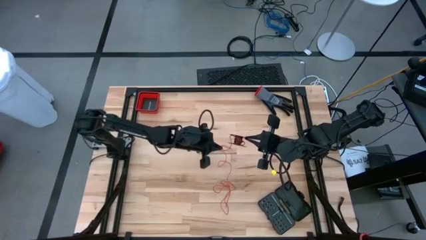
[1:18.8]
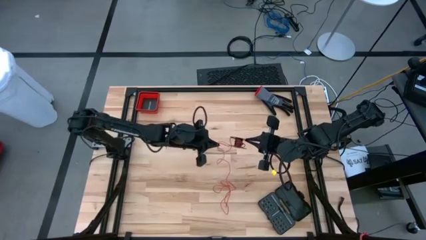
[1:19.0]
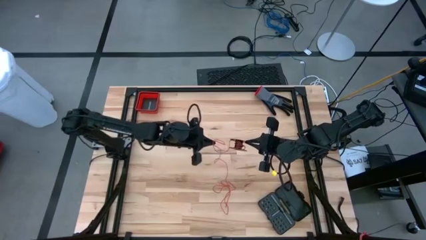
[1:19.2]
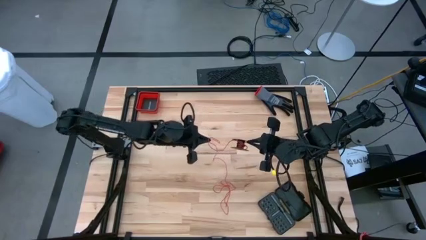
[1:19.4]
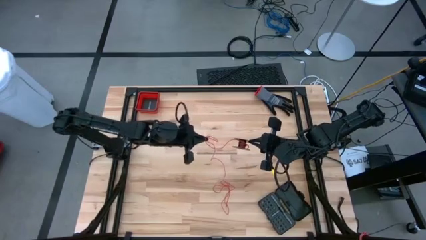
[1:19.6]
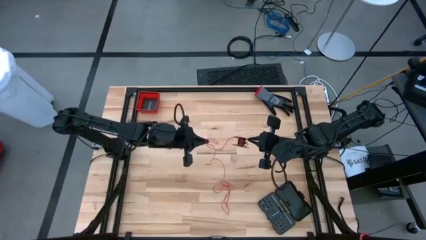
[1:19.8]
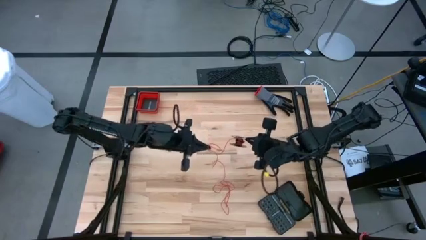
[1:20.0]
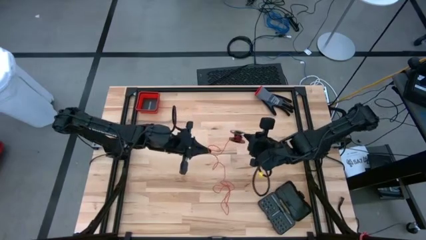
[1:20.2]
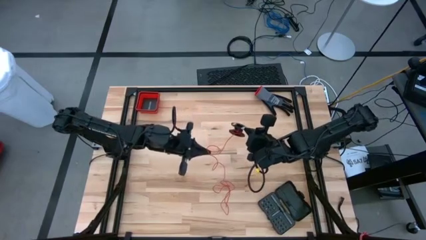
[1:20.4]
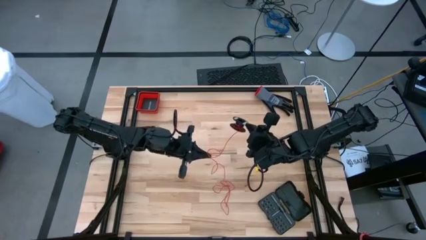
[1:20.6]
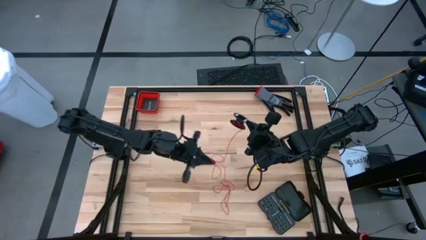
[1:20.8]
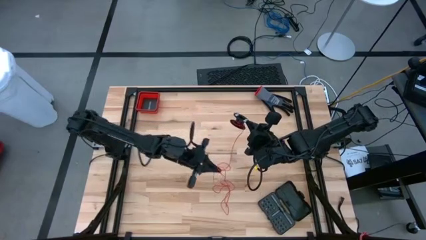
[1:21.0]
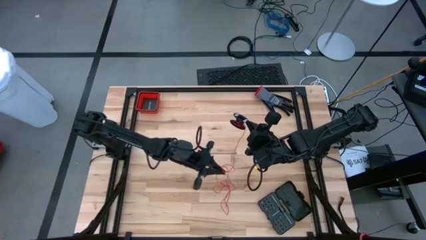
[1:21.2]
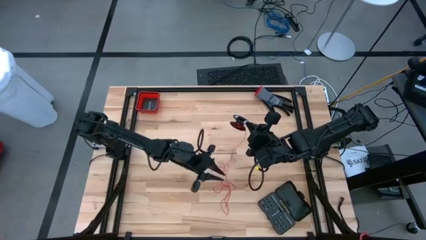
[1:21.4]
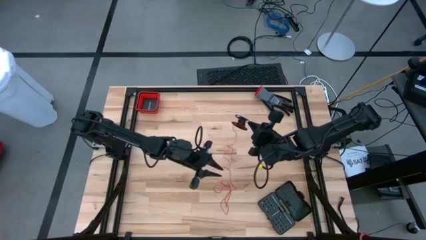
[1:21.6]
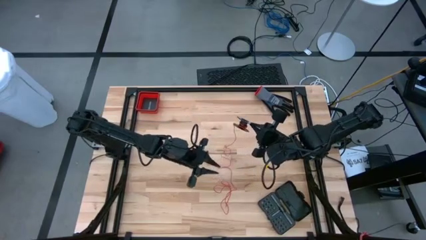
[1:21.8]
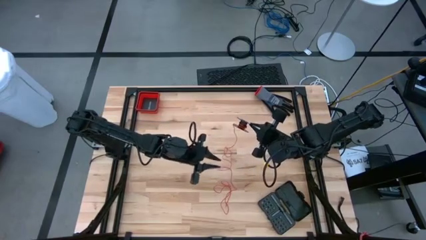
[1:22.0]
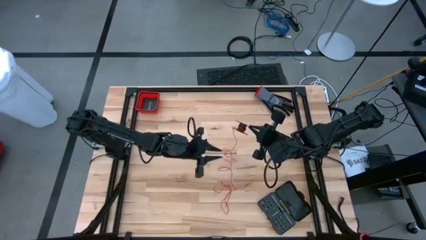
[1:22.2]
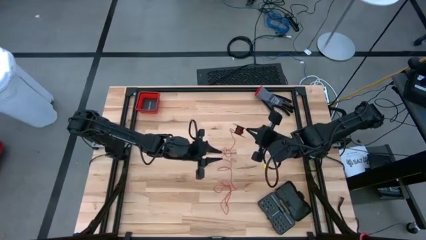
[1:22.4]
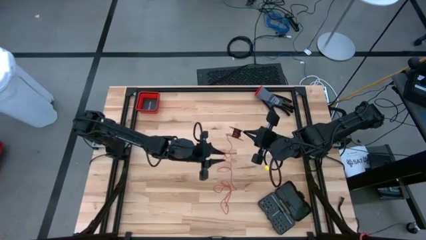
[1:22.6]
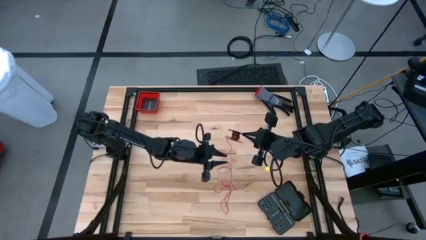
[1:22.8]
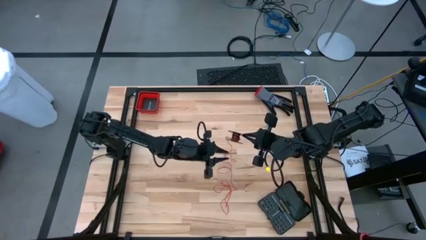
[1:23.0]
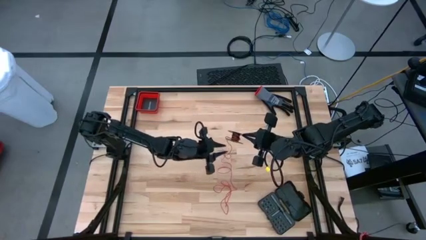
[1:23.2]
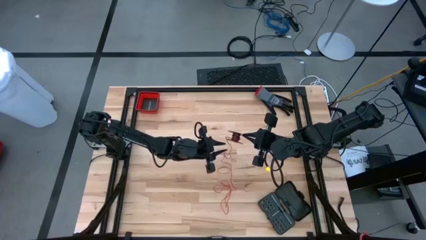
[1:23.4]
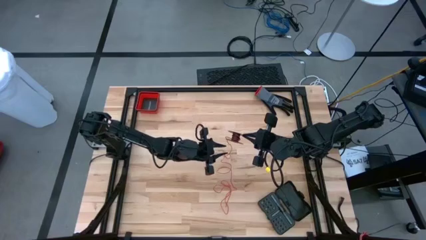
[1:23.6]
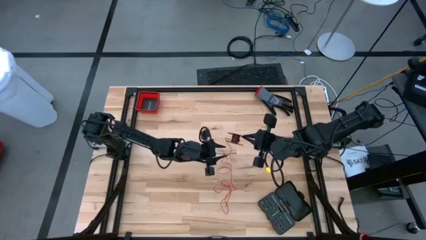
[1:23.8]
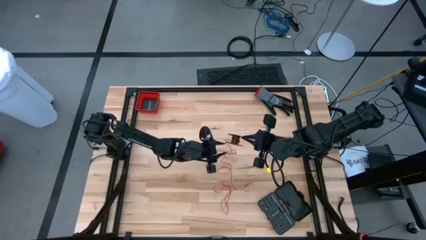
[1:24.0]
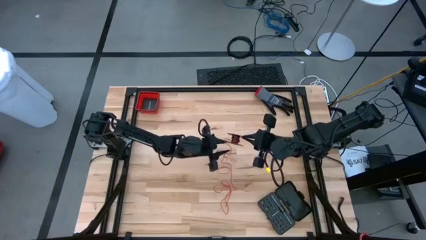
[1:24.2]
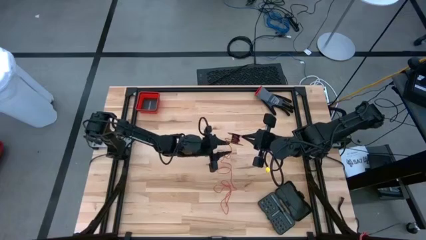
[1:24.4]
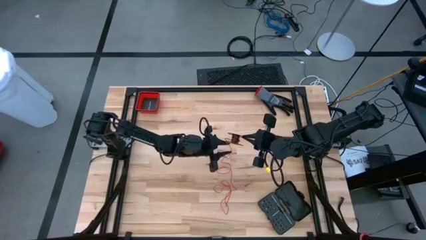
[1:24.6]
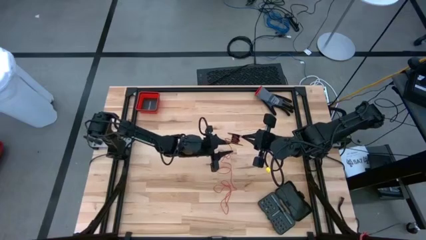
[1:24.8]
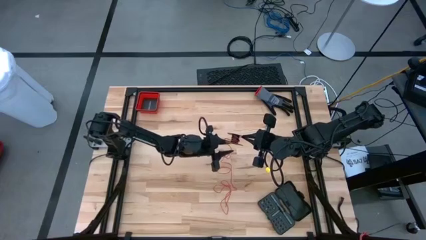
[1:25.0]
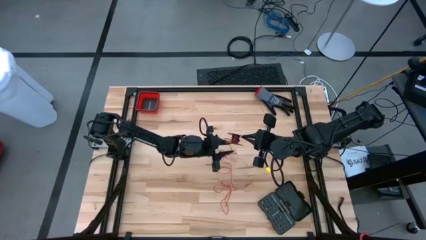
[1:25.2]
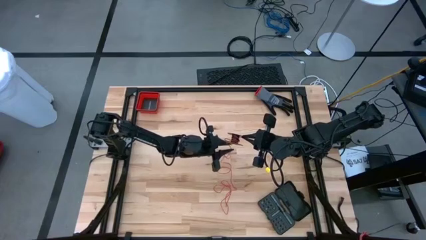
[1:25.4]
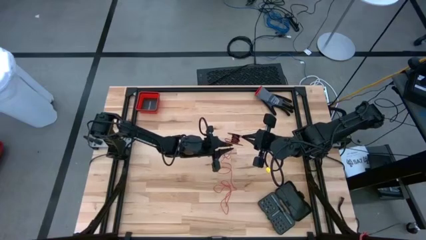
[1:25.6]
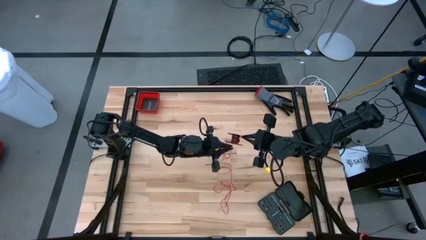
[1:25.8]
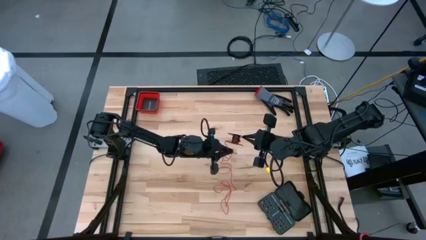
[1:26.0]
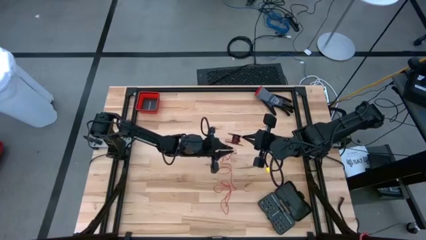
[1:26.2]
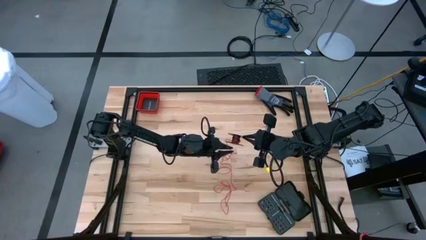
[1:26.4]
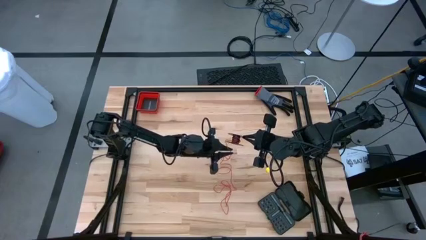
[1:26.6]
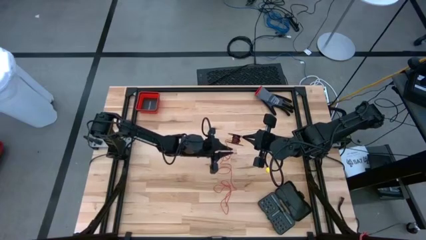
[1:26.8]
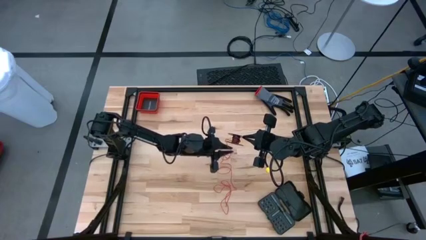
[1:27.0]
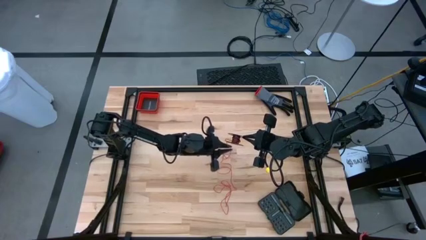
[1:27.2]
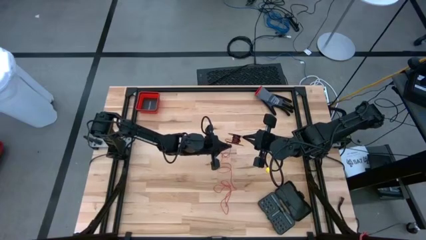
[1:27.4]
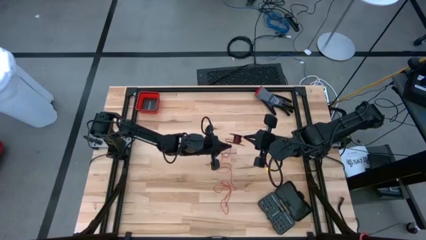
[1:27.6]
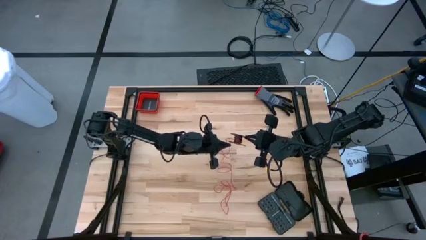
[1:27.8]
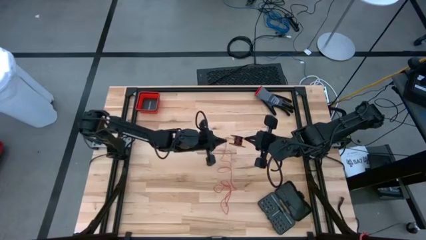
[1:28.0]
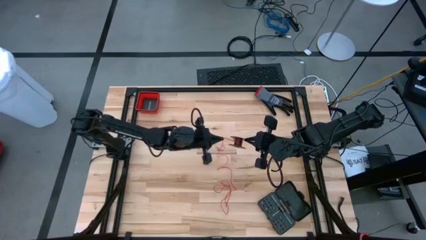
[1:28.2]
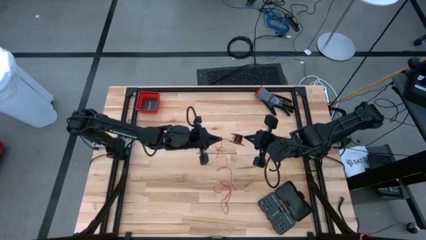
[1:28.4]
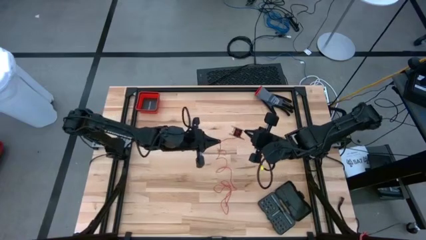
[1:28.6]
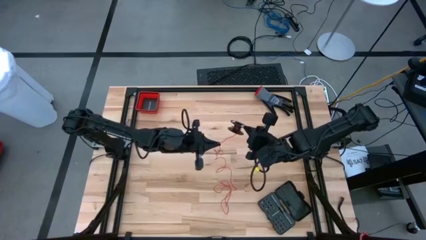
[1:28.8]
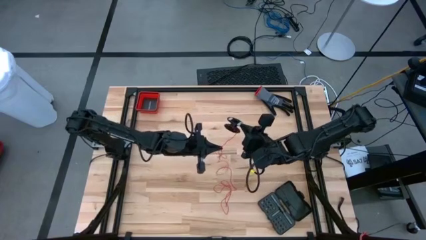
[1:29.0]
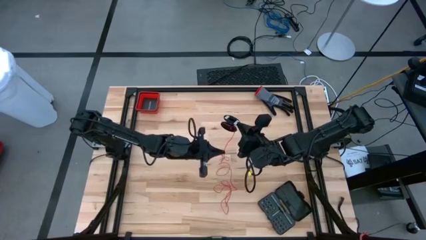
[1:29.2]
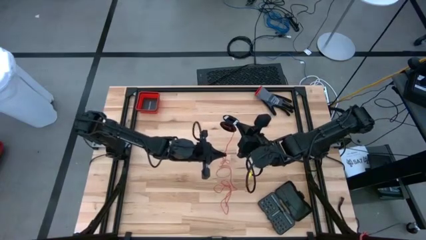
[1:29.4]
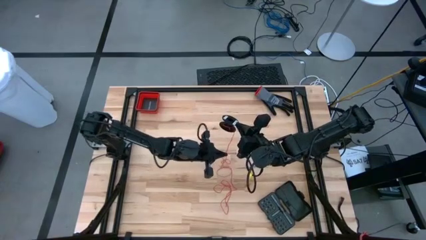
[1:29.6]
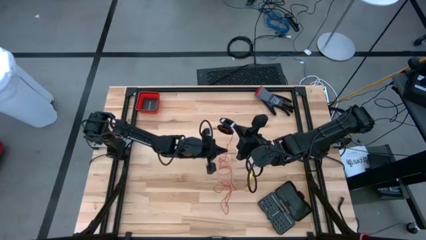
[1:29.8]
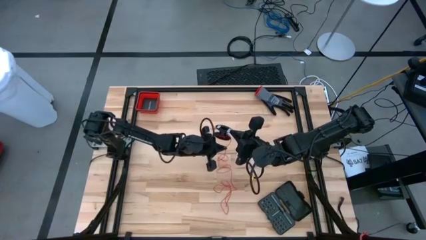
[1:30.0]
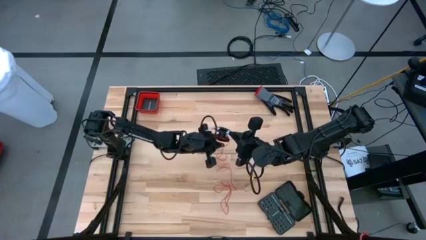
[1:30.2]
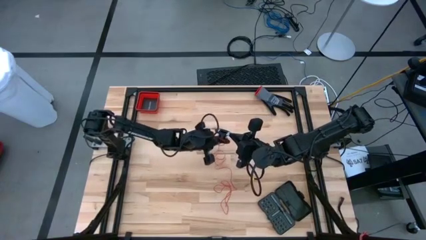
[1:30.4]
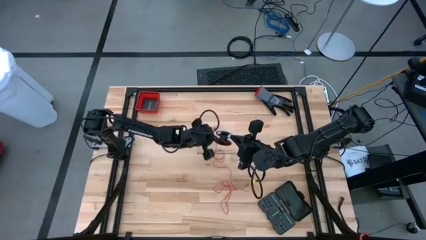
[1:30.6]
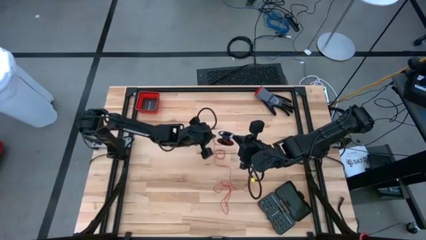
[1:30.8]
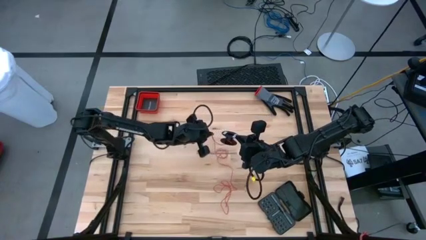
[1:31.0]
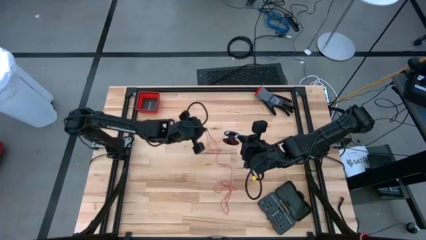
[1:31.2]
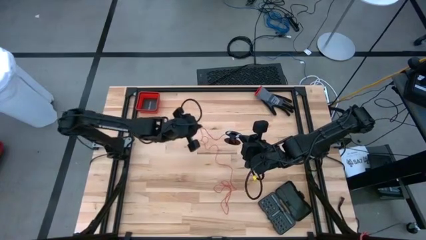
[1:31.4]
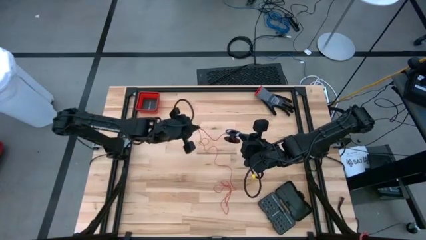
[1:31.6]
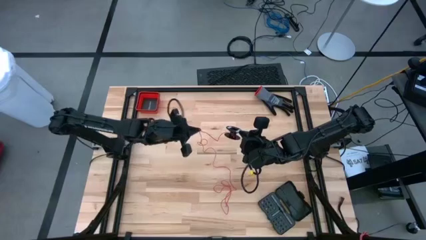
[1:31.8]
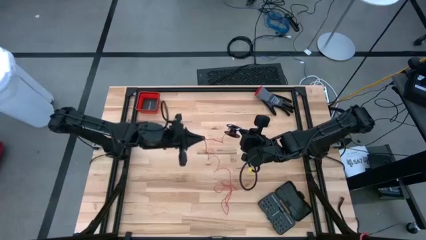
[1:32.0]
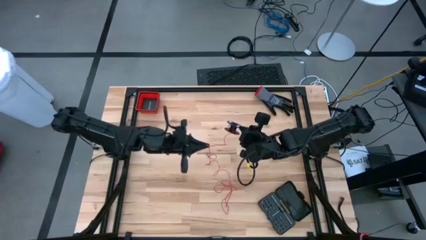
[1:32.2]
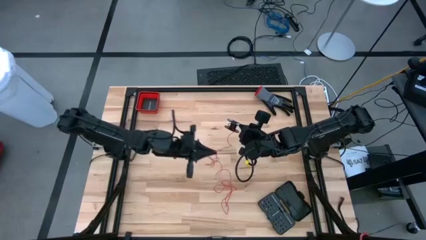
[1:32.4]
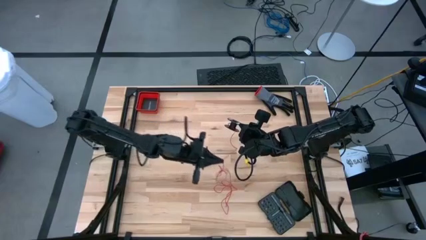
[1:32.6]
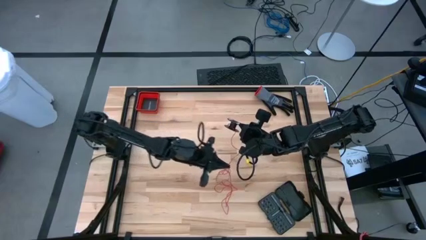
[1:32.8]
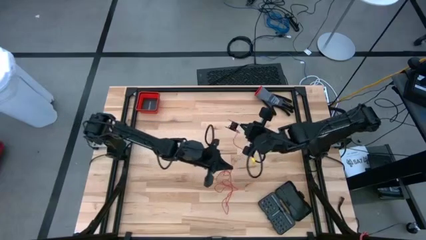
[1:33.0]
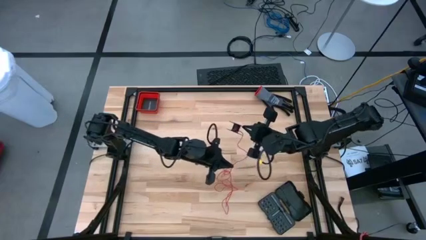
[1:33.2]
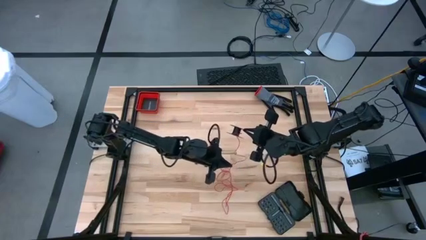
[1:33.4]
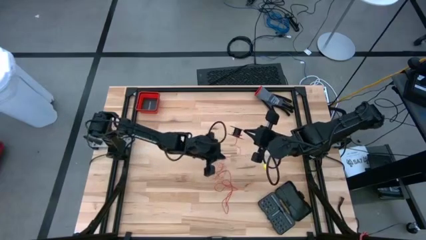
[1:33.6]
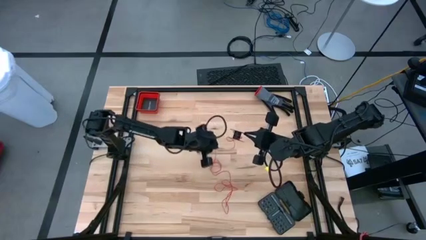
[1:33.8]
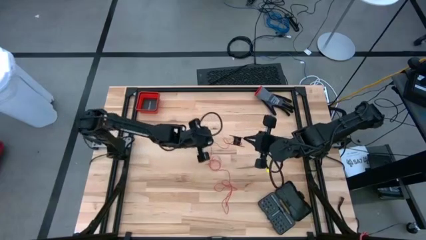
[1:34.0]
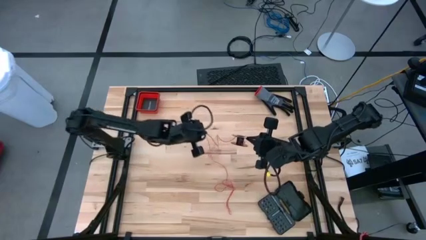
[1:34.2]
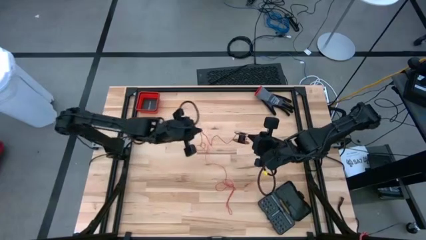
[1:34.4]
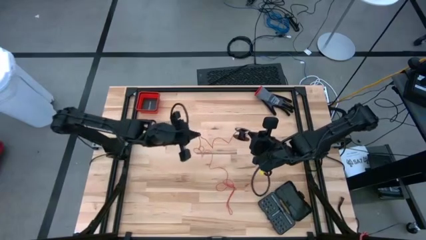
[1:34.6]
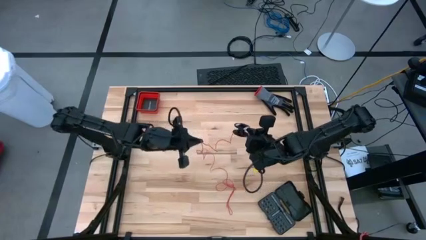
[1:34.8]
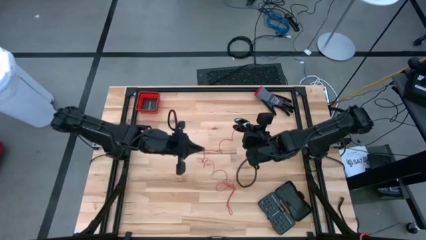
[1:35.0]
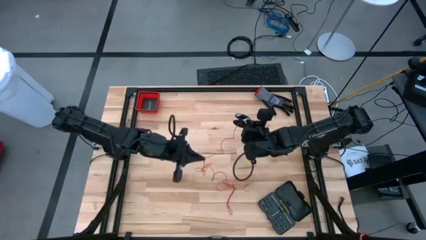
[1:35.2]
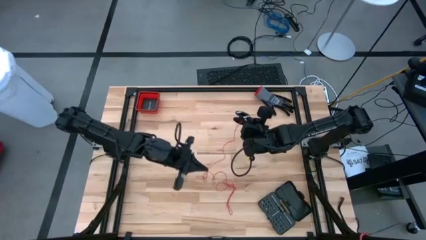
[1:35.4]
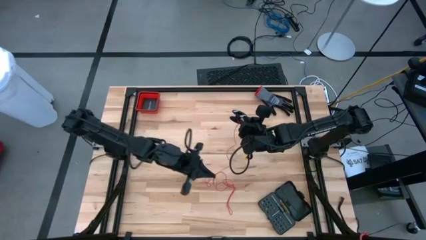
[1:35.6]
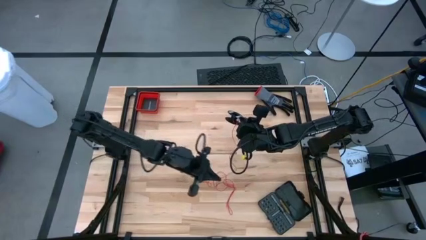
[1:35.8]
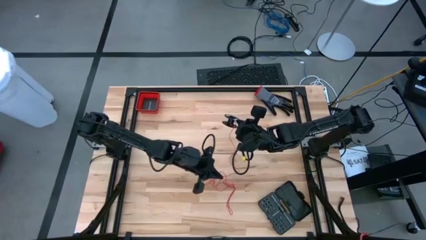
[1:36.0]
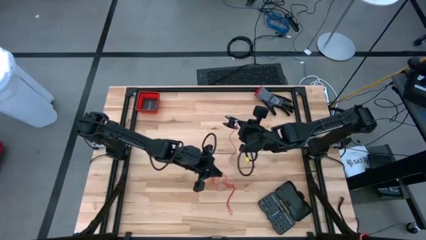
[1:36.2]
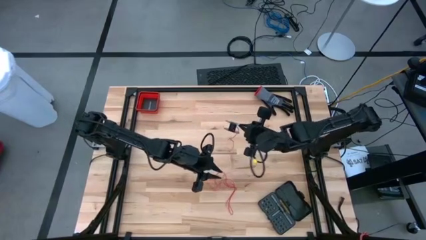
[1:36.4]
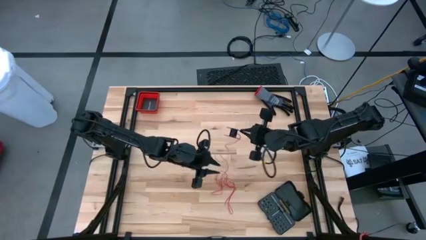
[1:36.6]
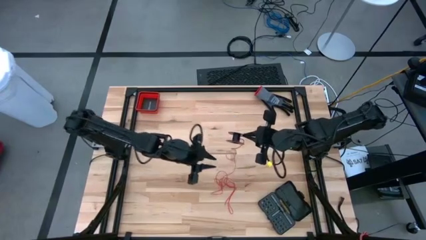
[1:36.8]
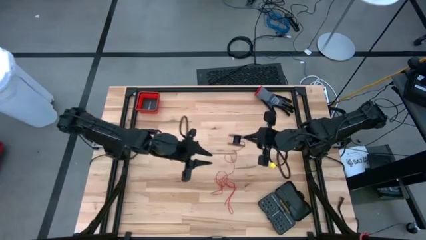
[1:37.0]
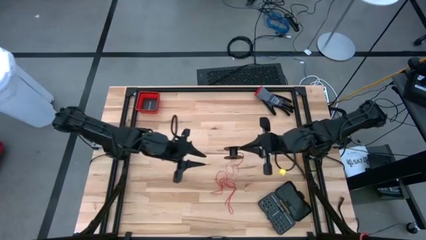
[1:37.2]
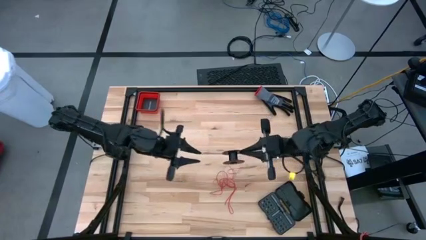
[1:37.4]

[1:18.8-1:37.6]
Task: Coil cords
Uncoil the red wire from the spool
